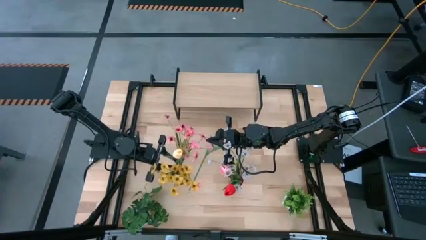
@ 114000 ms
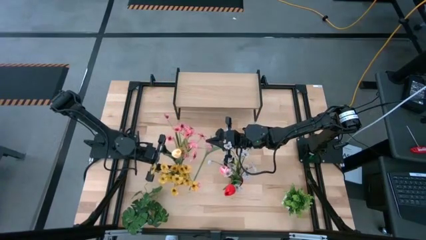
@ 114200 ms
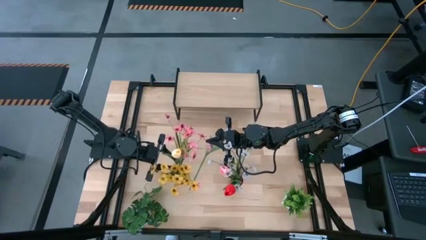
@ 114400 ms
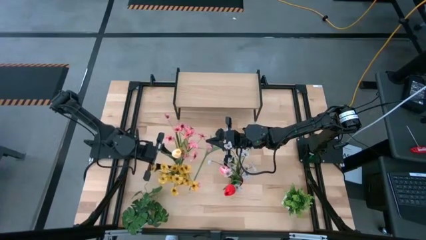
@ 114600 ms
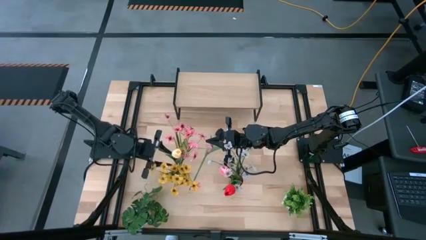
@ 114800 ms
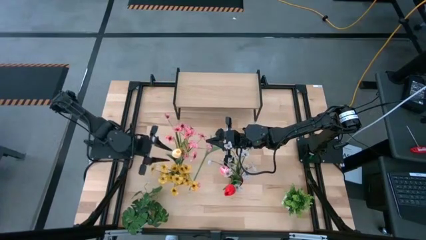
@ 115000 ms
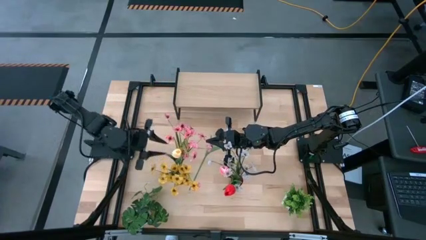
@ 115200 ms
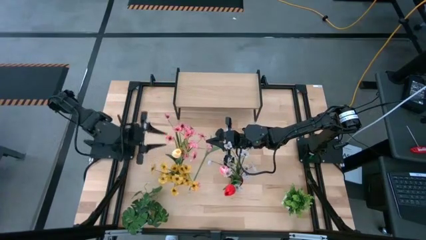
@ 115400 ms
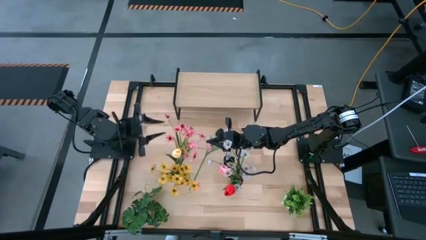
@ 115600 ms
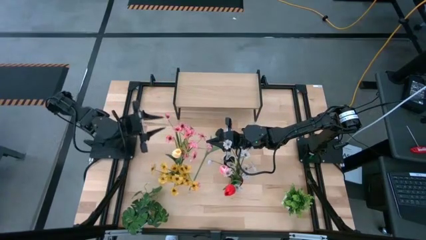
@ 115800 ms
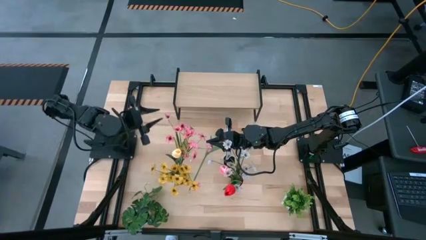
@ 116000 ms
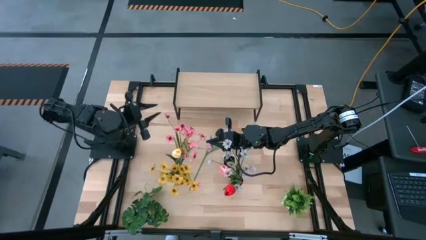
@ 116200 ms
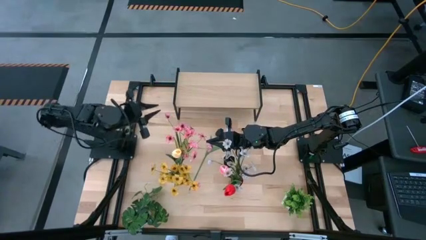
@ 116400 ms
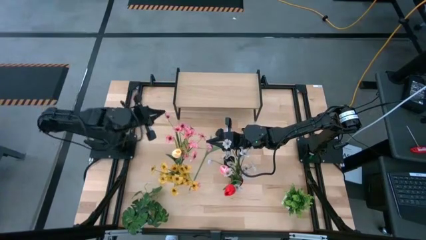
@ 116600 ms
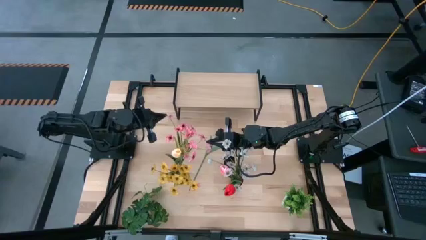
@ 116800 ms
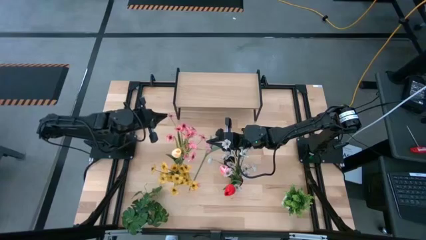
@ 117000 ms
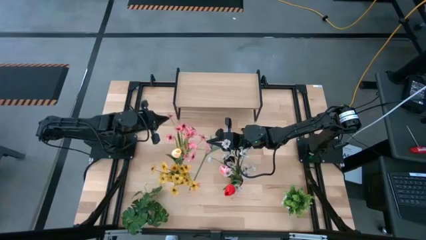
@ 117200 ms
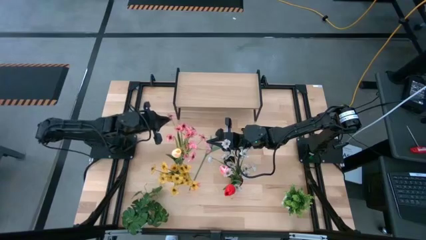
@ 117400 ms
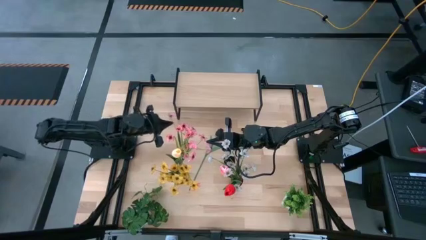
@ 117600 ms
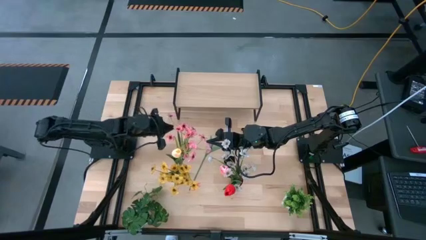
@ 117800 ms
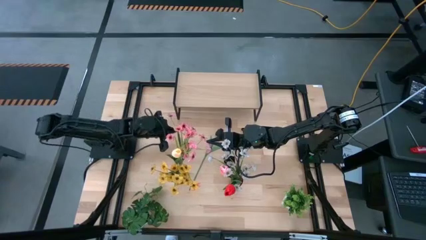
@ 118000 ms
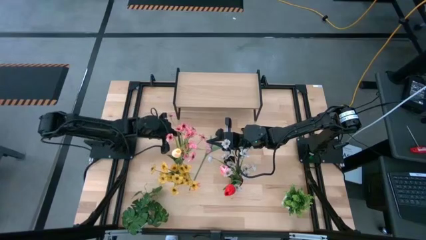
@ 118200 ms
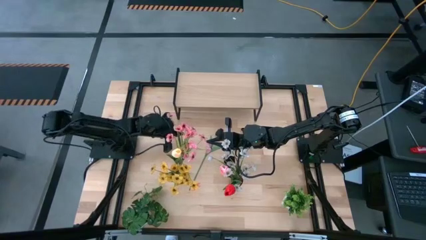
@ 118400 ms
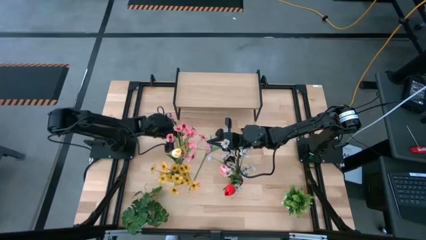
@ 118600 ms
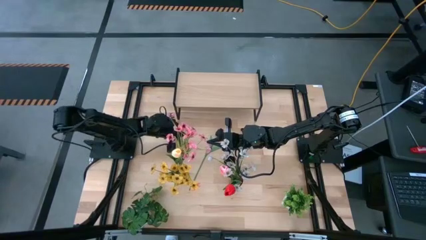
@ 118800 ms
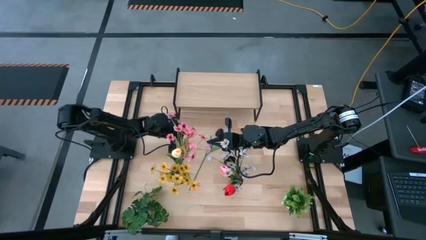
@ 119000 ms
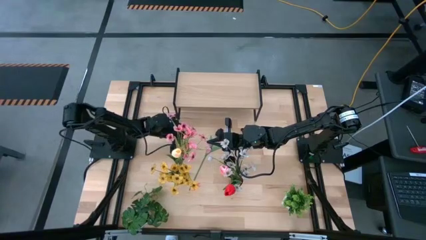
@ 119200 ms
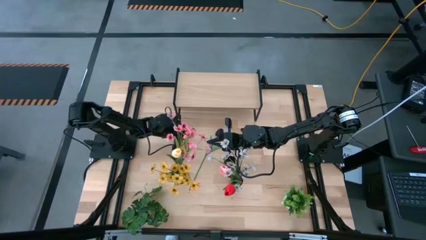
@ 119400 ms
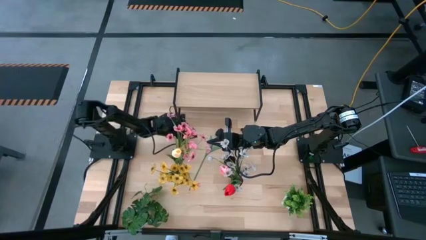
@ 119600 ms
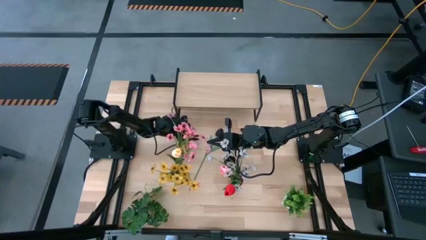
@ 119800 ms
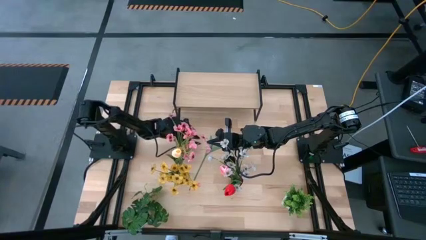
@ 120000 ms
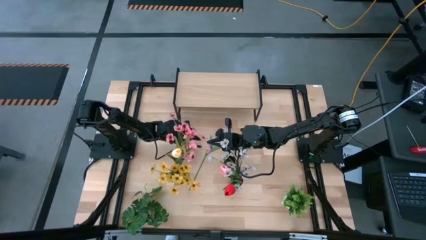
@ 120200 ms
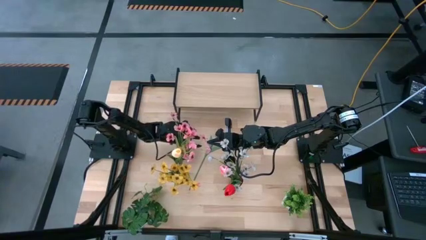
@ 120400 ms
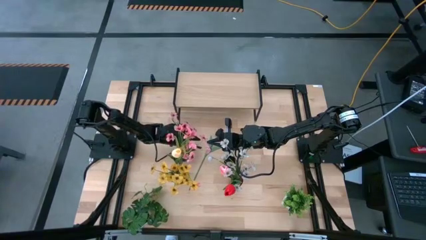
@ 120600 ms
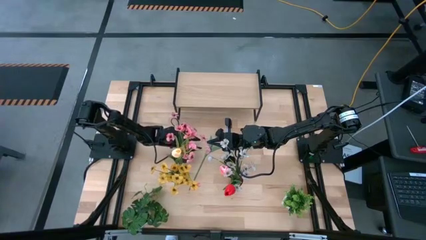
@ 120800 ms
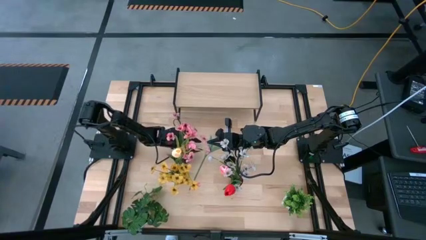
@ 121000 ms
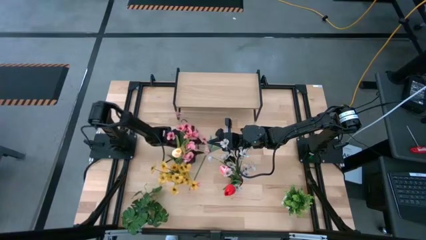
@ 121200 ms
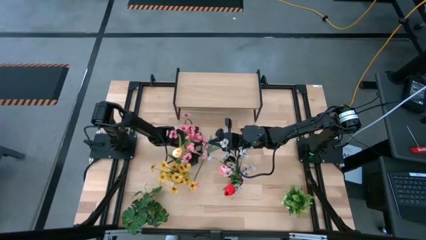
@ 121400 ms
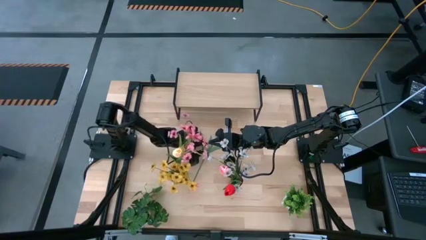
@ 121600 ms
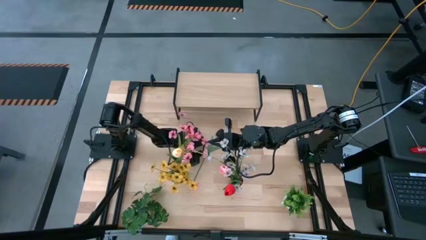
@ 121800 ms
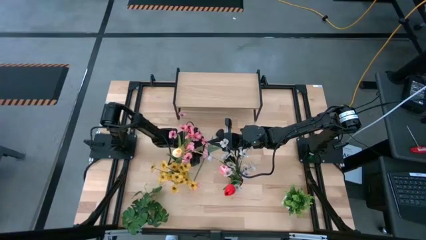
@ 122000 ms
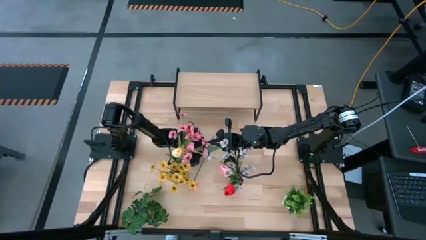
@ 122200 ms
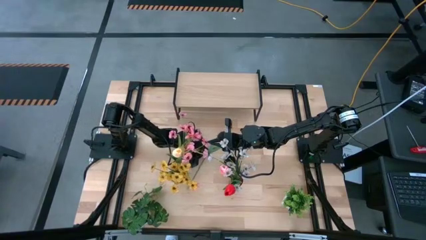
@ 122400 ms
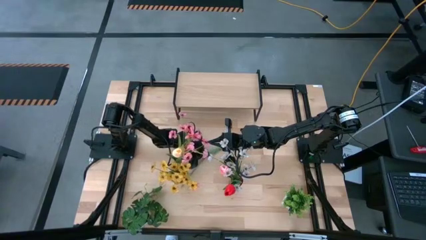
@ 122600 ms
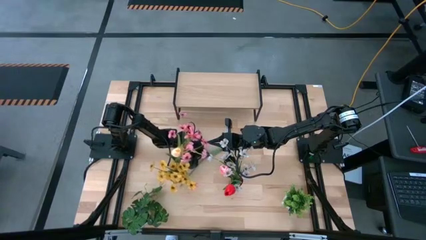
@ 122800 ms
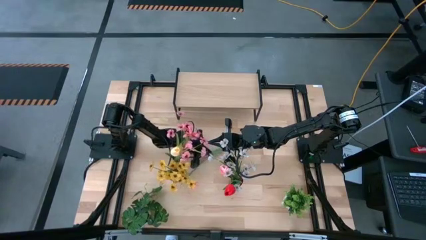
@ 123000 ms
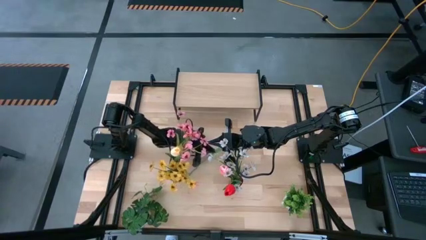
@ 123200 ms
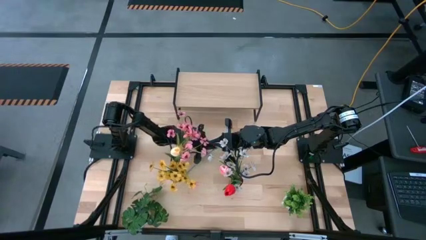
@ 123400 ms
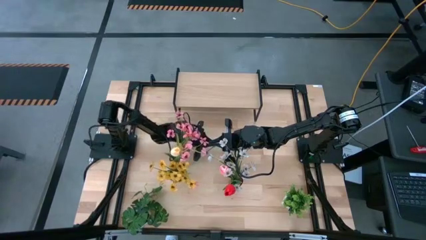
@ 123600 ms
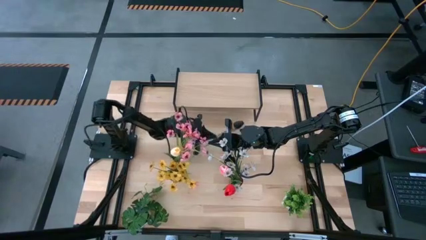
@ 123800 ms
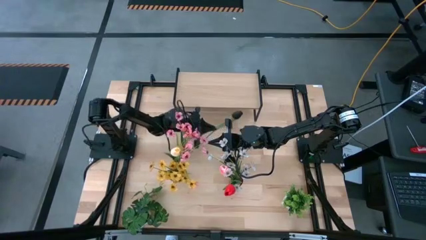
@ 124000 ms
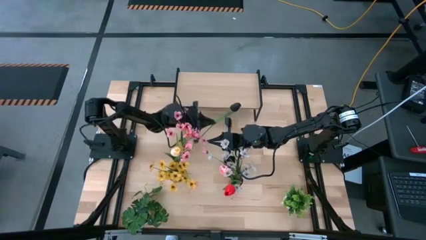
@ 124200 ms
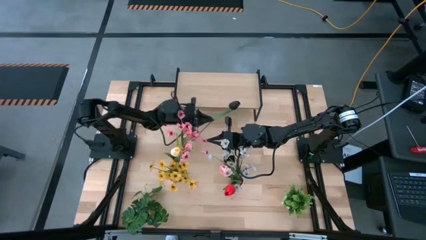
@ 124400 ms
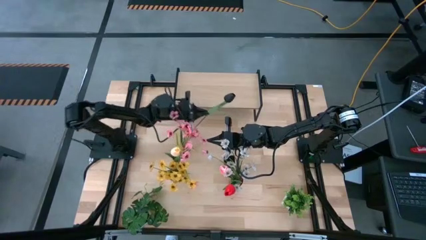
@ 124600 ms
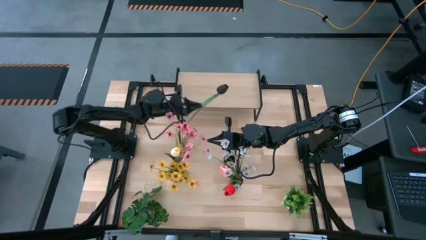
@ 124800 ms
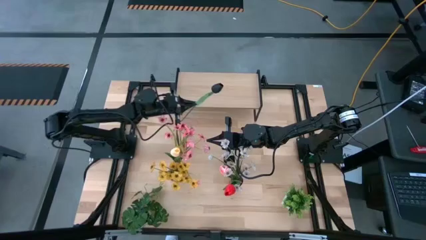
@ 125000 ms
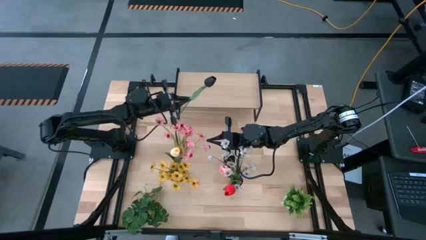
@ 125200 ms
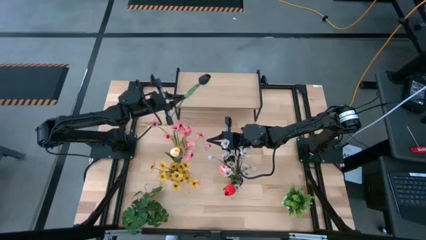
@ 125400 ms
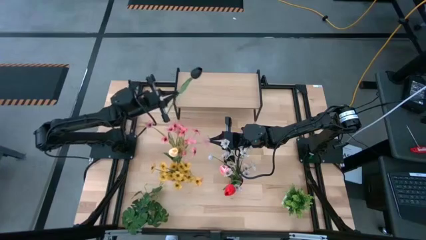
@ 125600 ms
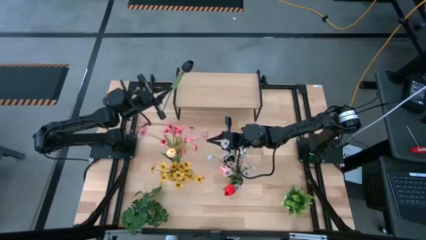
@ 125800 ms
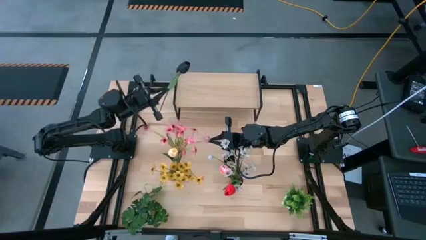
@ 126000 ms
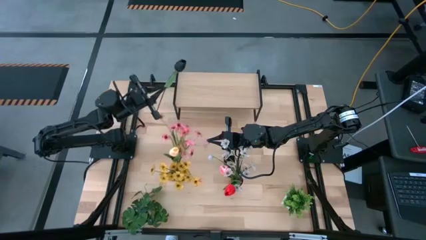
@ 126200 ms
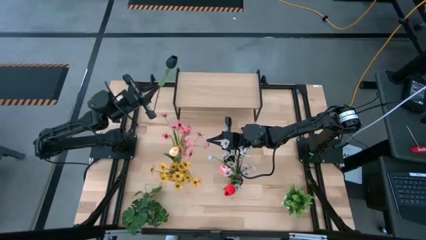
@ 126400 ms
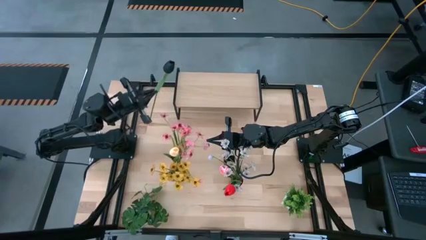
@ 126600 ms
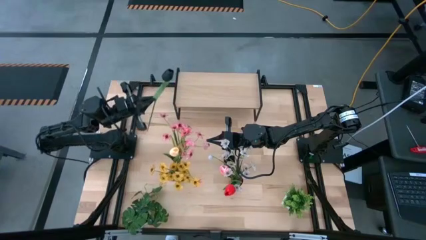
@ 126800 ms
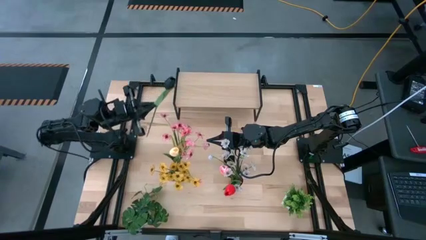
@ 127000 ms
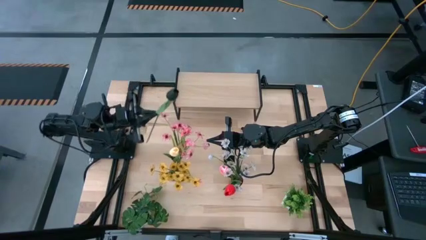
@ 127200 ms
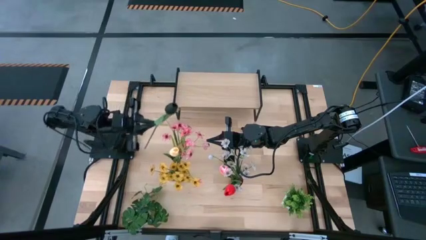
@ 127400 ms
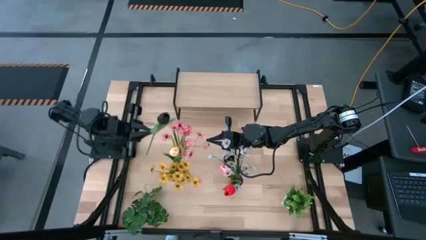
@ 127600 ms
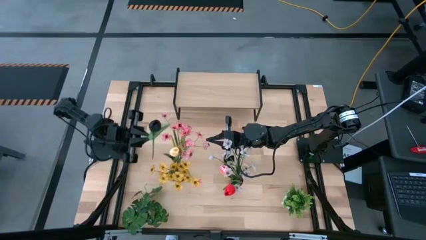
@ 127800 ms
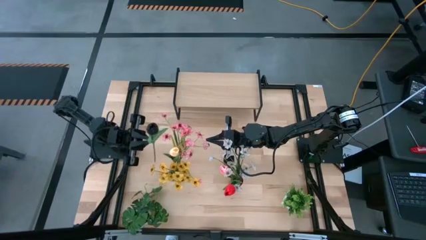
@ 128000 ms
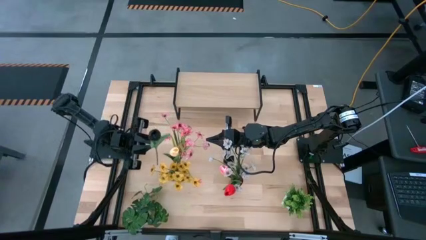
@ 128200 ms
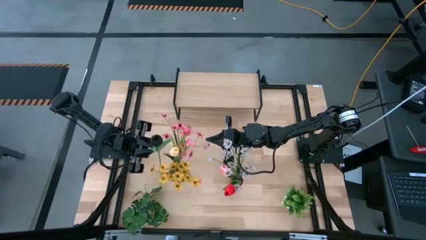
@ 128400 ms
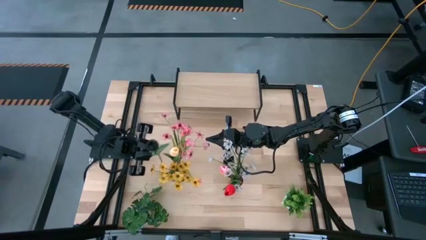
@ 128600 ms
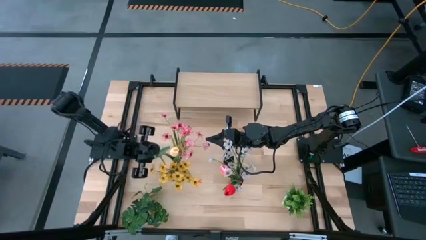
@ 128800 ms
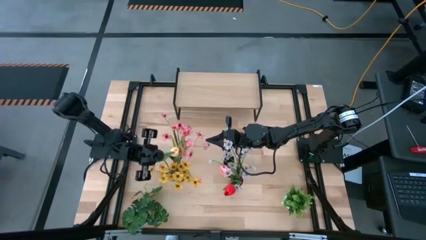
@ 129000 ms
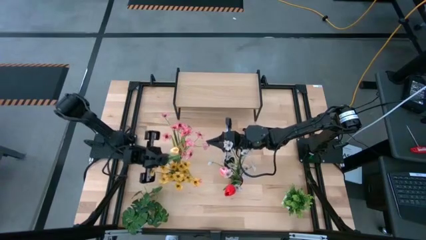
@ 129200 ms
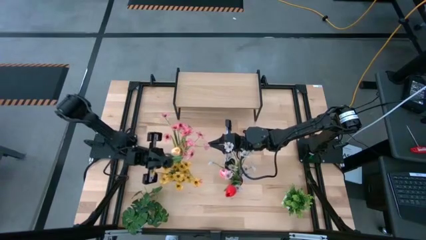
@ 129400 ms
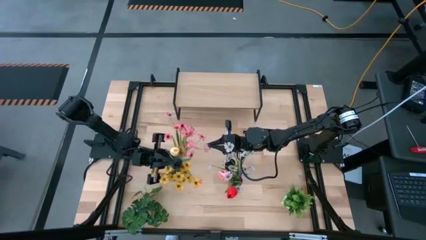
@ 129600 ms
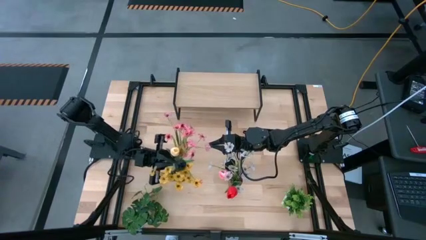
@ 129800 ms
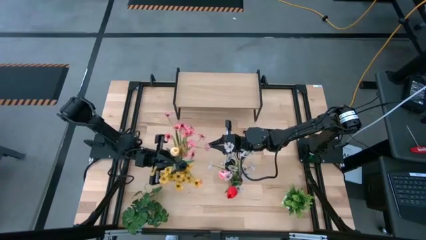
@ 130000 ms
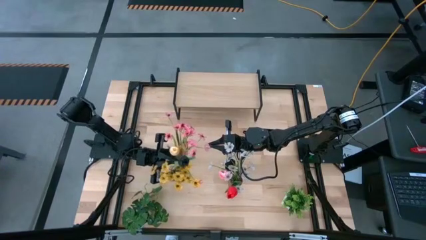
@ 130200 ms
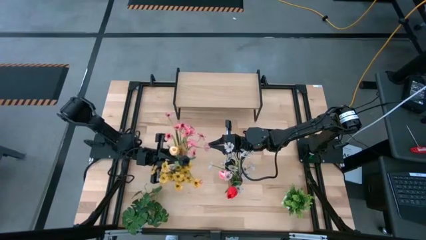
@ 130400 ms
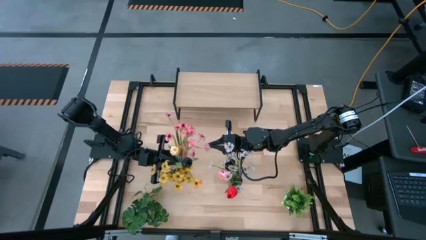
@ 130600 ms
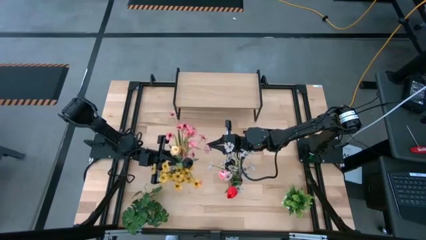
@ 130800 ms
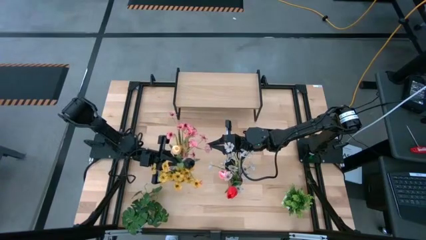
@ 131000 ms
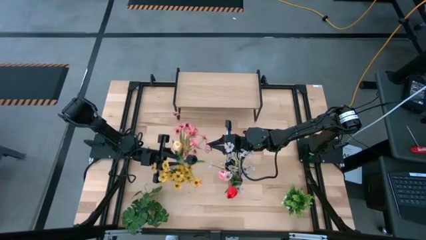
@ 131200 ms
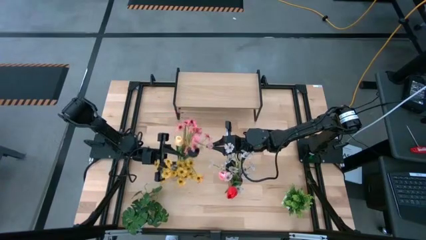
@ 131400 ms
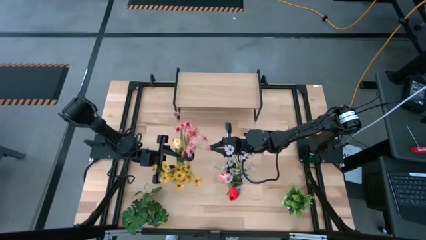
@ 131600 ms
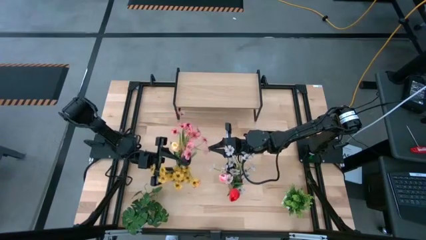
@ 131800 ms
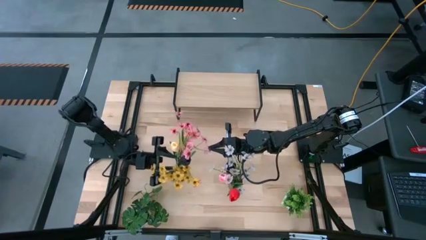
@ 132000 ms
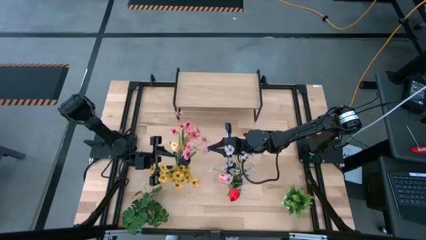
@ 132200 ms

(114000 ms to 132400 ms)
Task: Pick and place flowers into a vace then onto a shelf
Put the black tulip into the transparent vase
